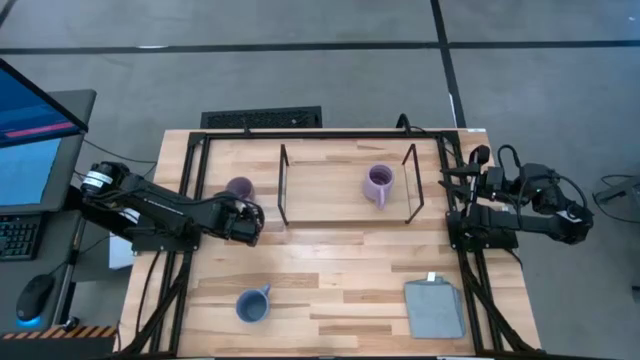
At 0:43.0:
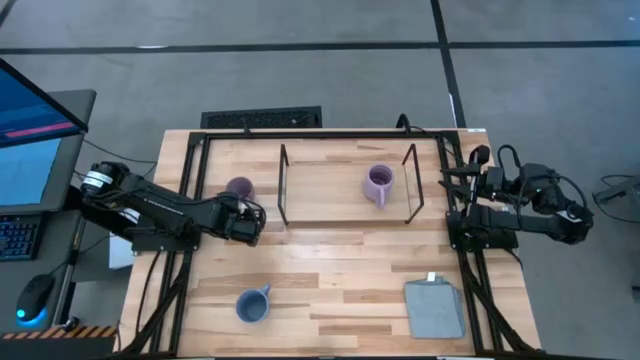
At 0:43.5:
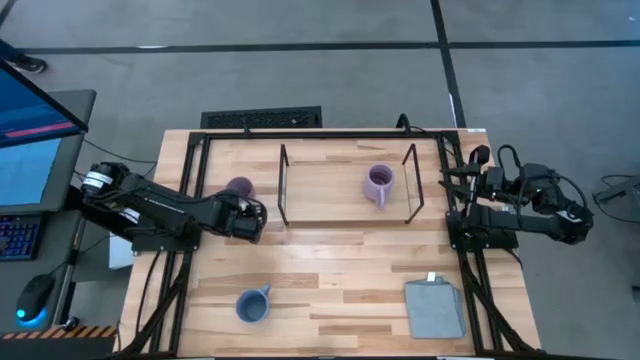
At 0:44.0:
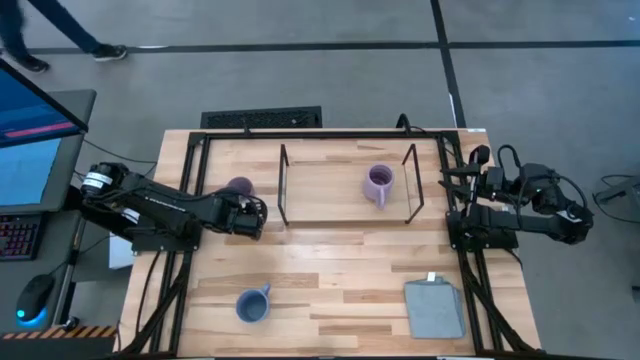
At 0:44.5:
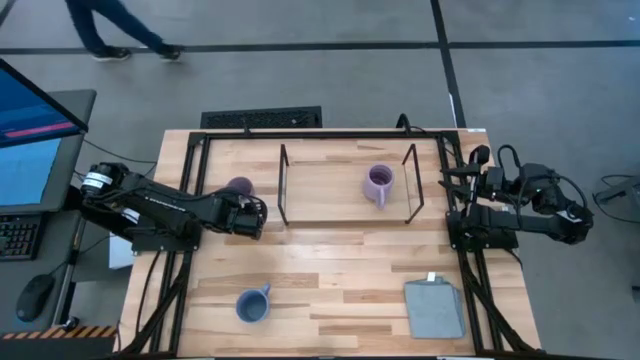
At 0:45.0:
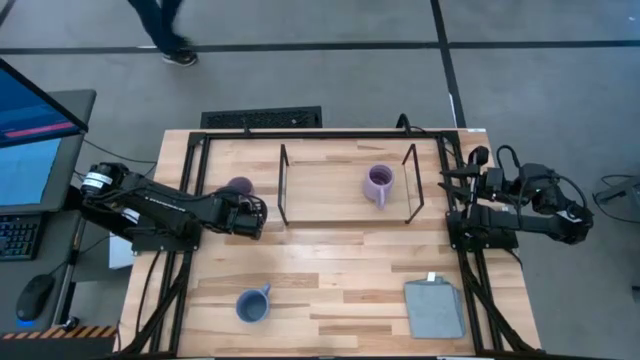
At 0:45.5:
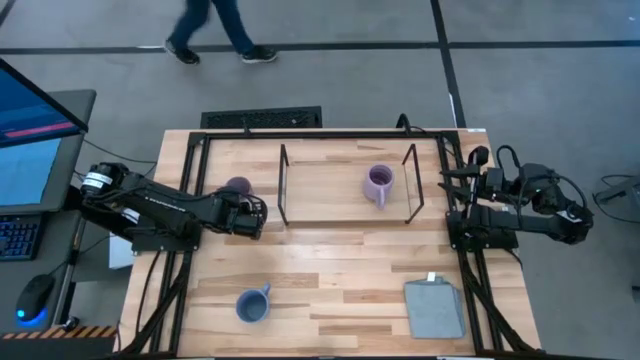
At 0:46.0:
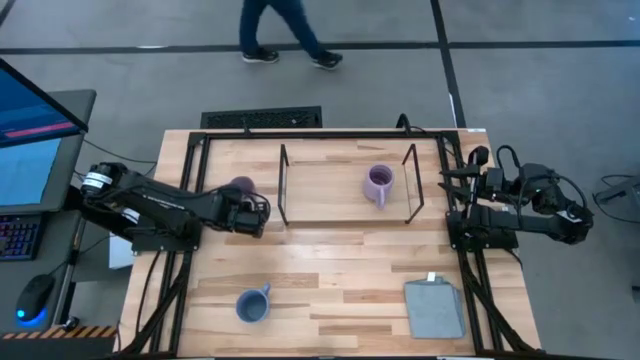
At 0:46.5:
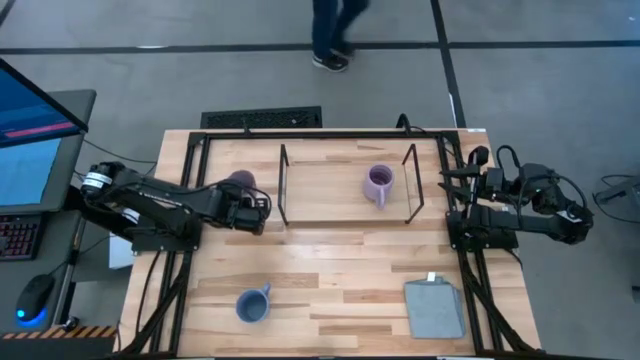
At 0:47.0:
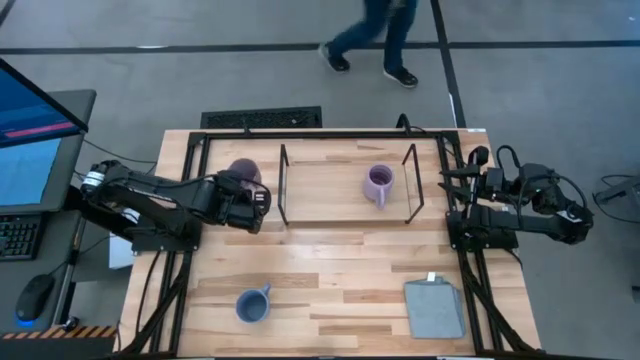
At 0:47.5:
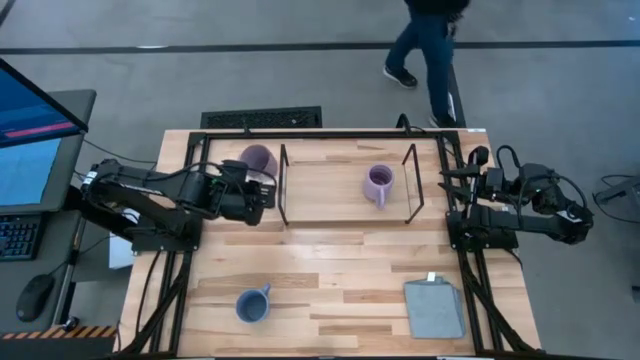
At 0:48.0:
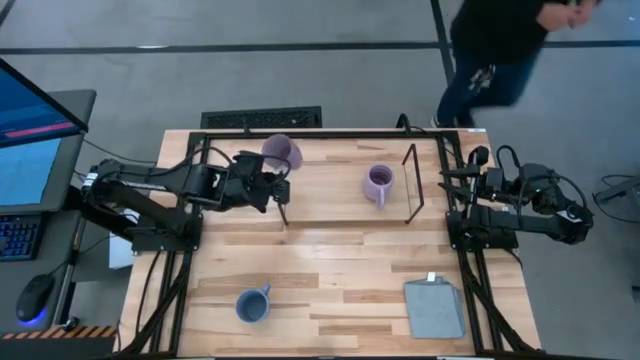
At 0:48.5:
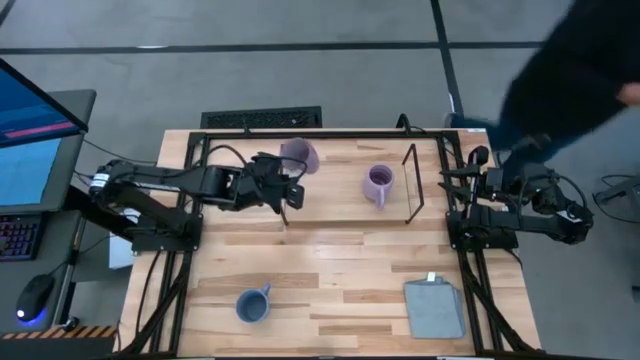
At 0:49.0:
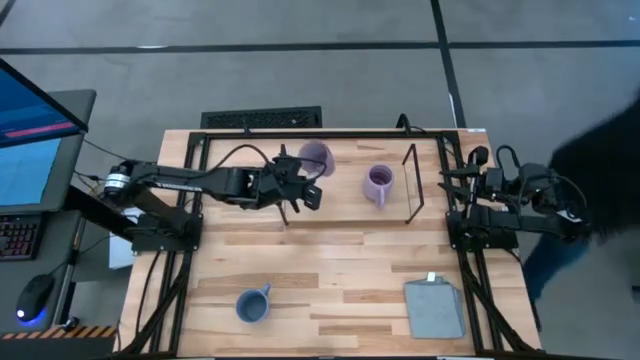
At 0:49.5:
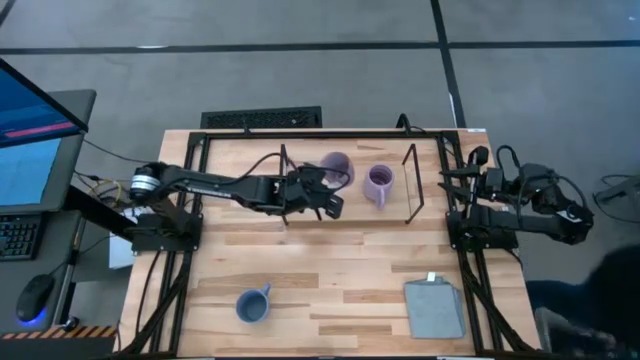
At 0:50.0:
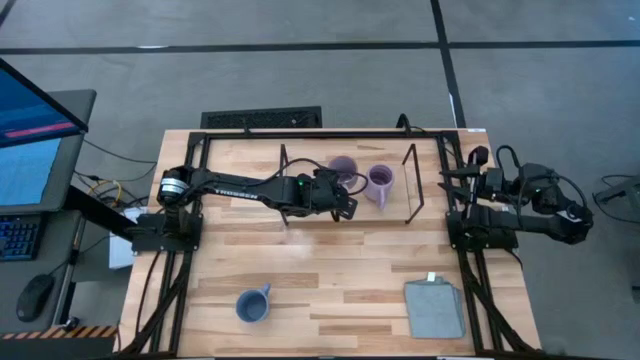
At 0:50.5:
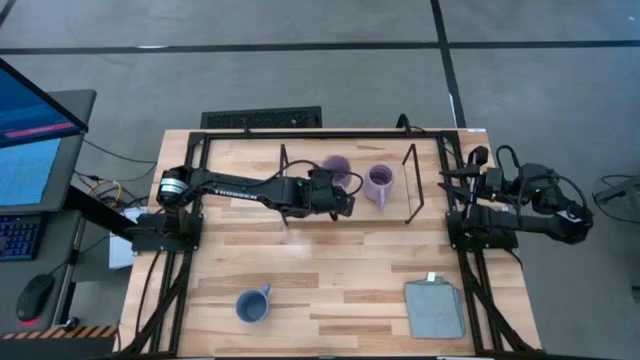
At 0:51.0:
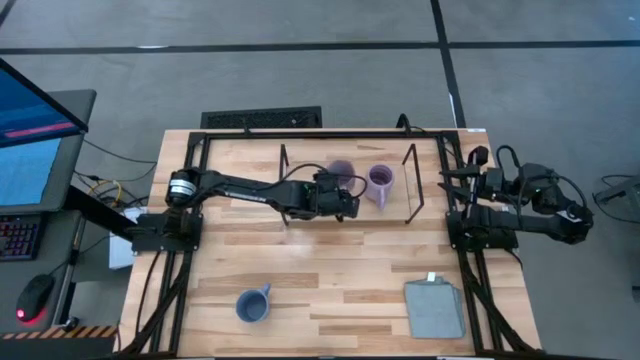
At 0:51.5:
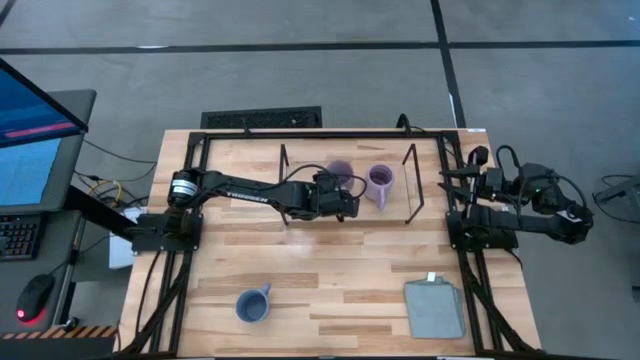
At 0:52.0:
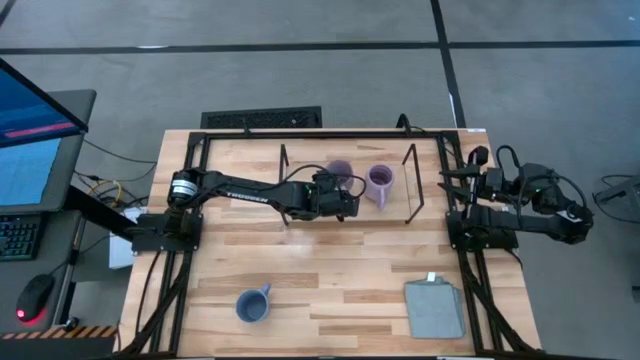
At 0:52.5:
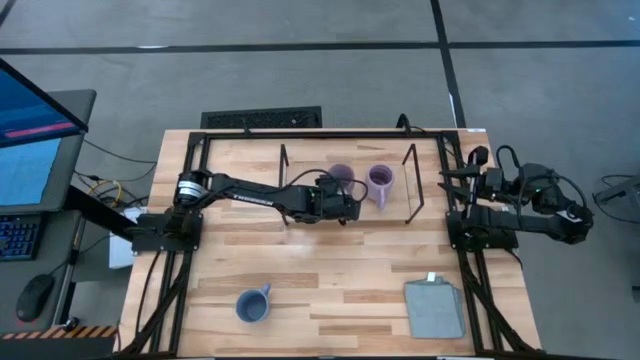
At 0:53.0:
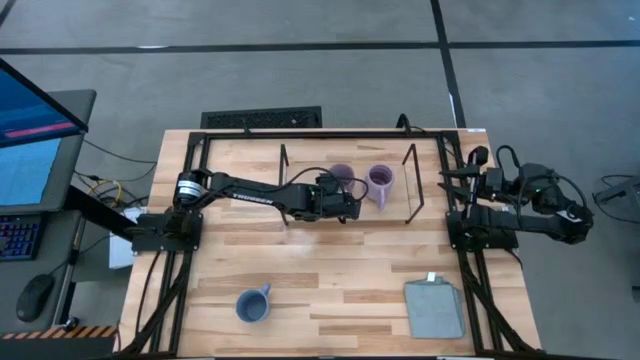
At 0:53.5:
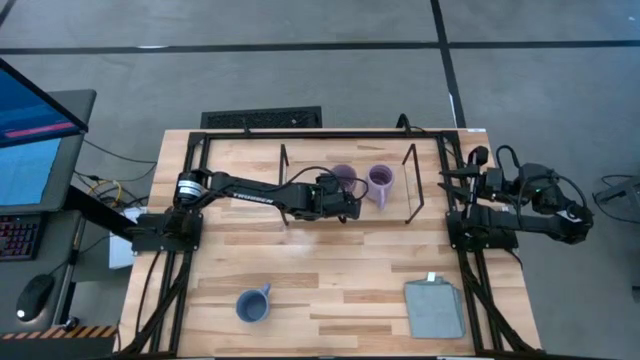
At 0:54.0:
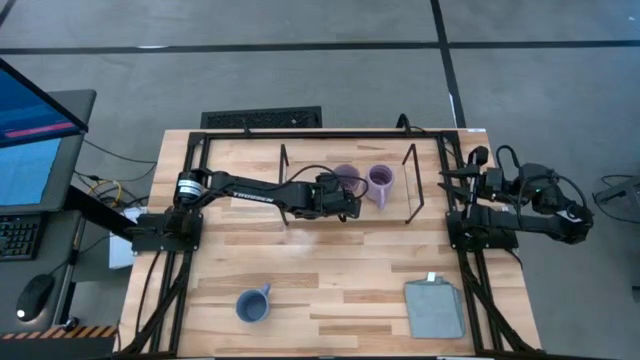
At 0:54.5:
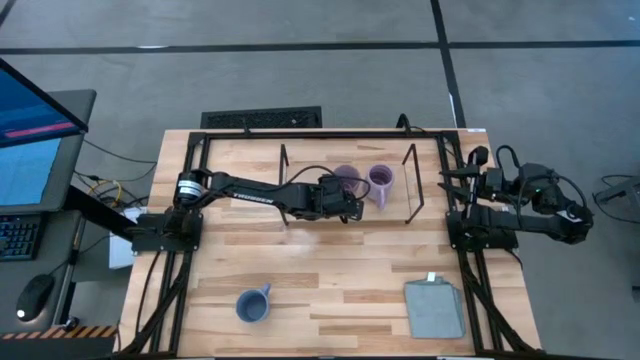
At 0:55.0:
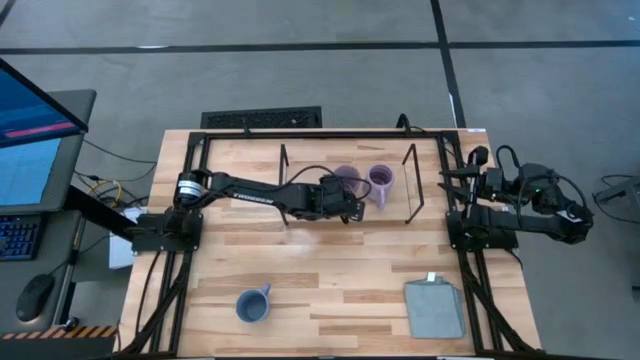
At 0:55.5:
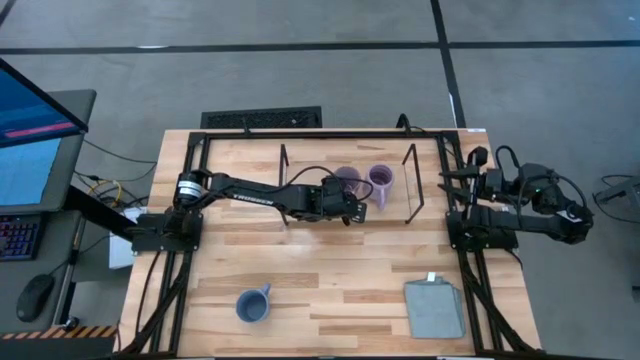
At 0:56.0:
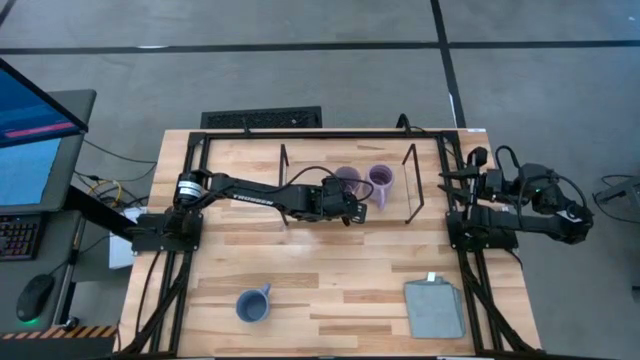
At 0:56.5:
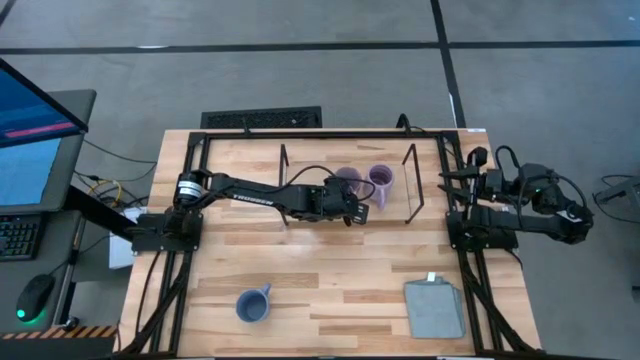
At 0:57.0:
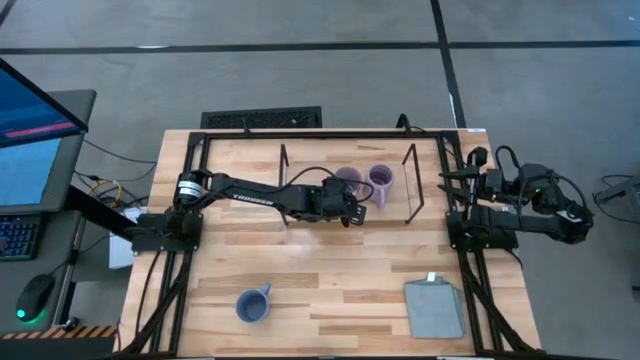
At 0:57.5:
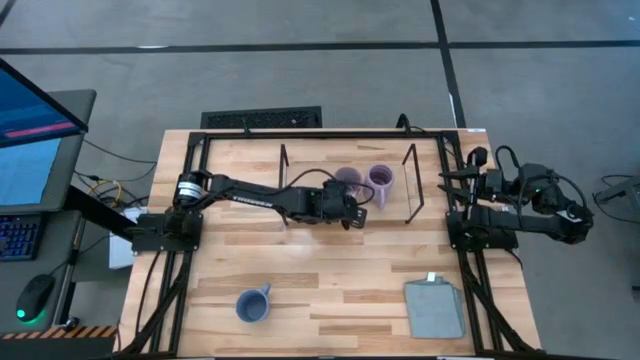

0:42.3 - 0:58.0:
Task: Stack small to large cups/mugs on shelf
Put the white and violet mug on the shelf

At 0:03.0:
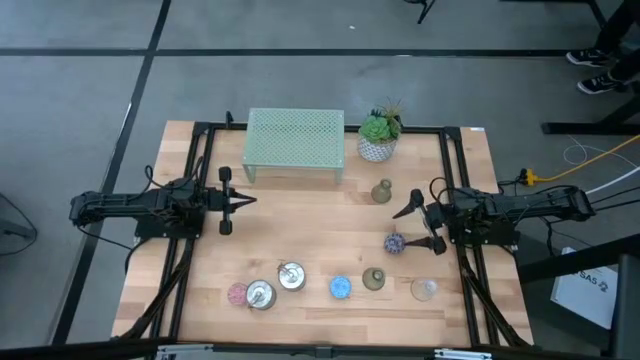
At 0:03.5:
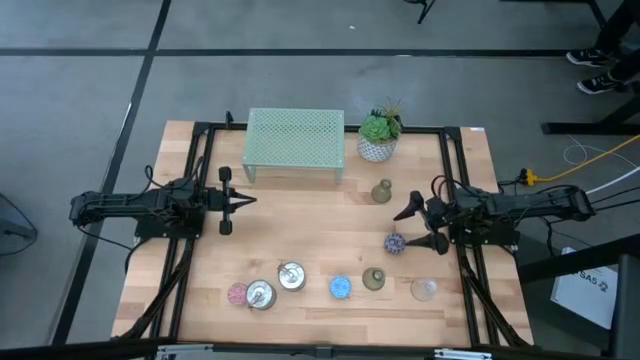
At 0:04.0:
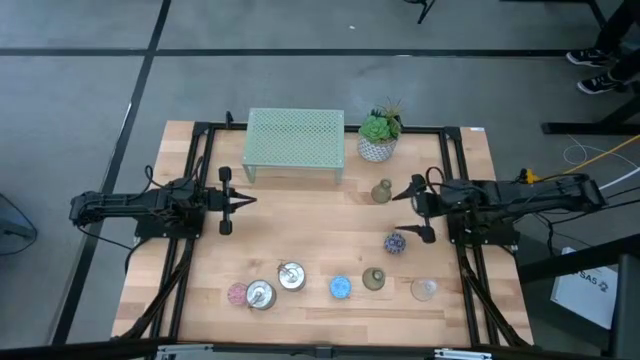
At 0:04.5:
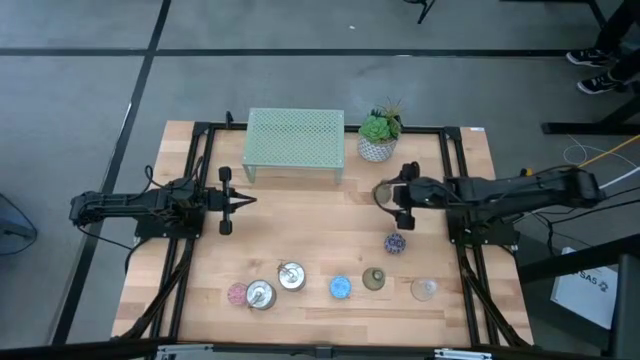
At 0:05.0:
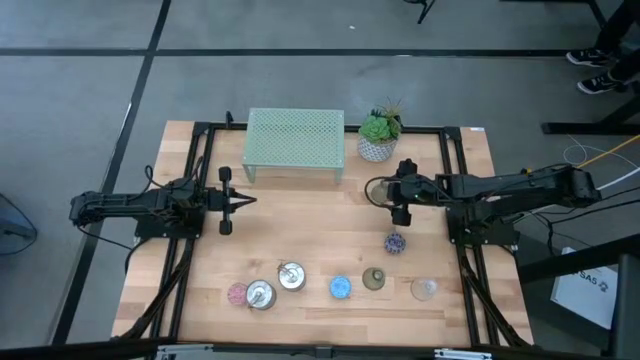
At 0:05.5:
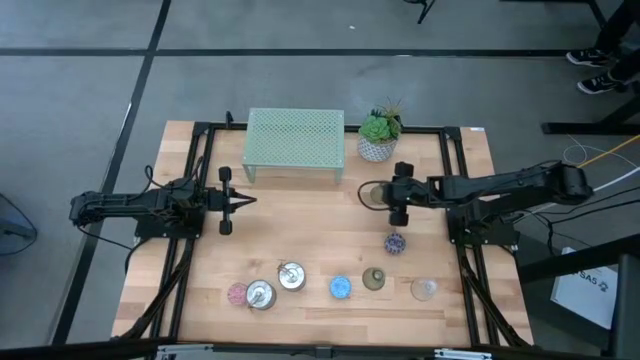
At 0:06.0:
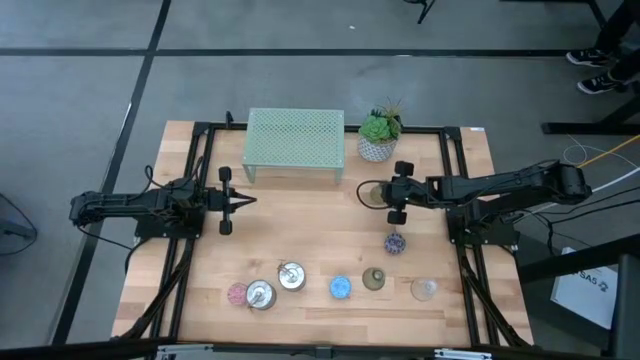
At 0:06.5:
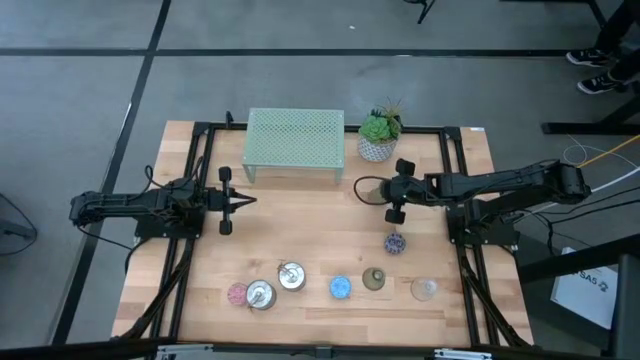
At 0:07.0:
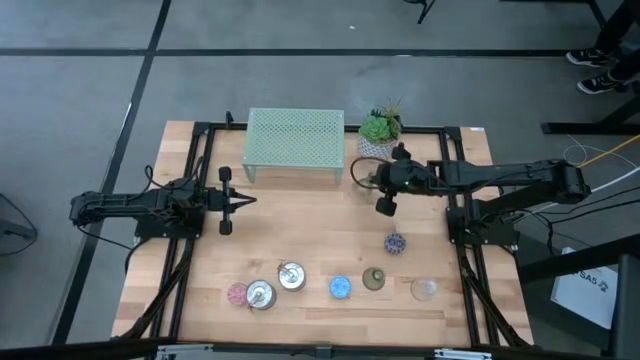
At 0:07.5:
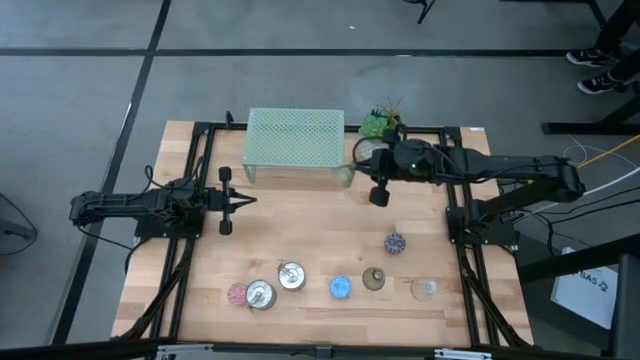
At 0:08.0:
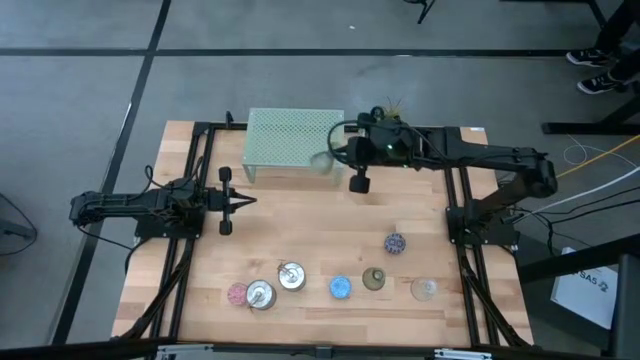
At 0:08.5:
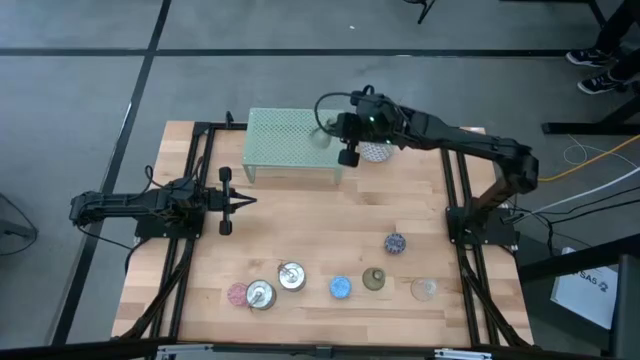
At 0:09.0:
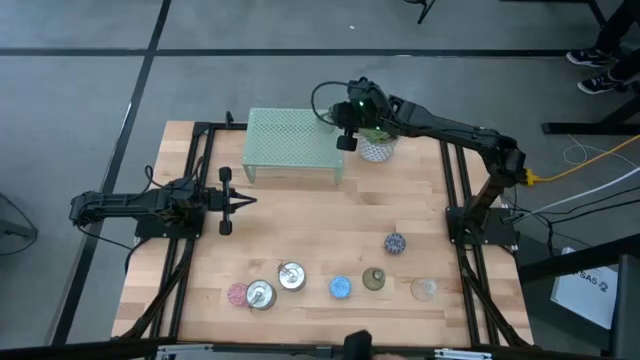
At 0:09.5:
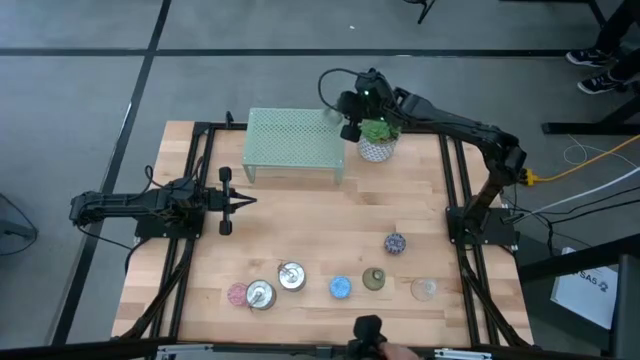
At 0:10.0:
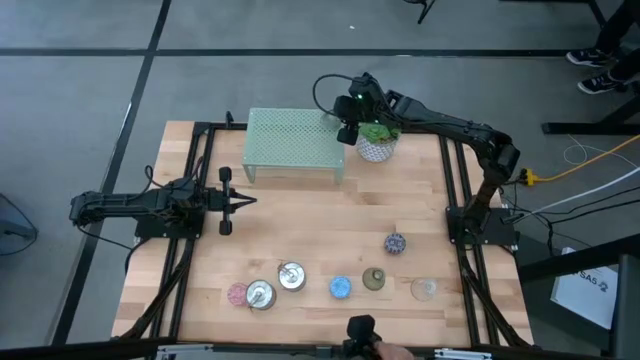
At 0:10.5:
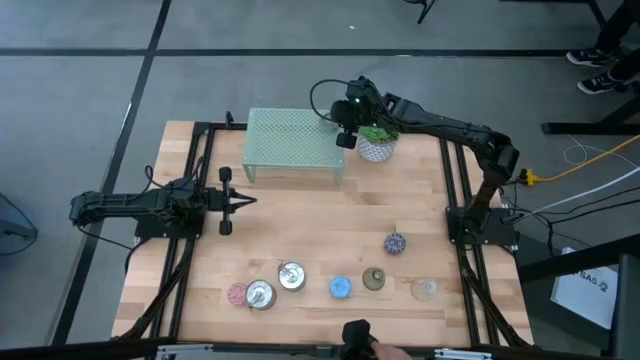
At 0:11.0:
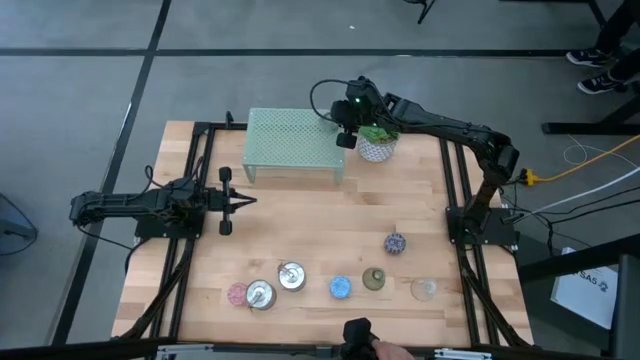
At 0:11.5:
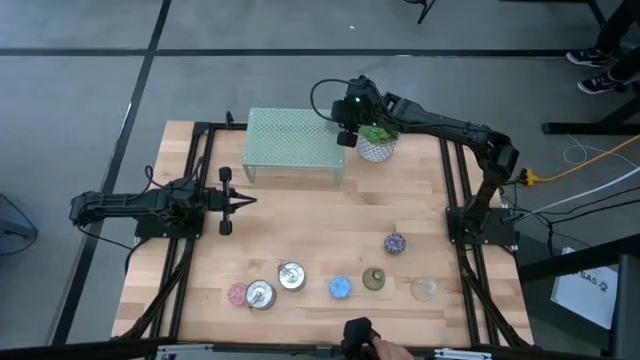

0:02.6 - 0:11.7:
Task: Pick & Place candle stick holders
Put the top green glass candle holder on the shelf
